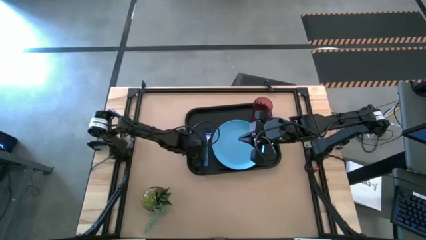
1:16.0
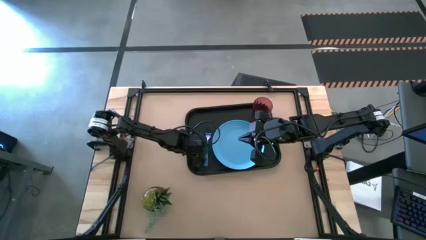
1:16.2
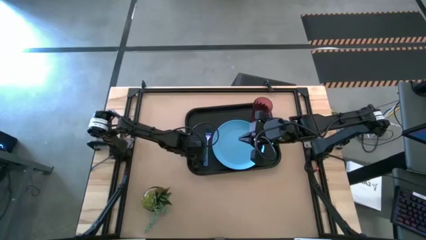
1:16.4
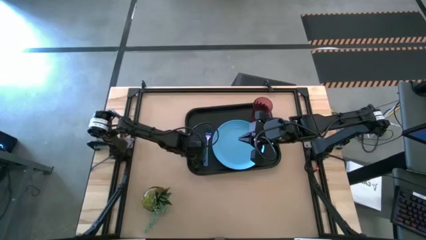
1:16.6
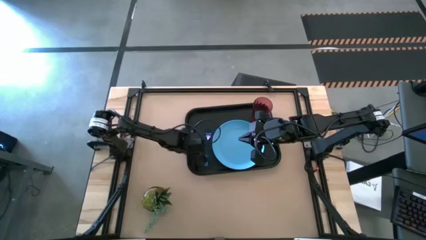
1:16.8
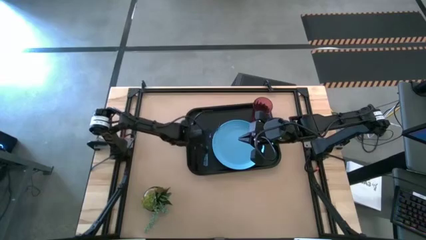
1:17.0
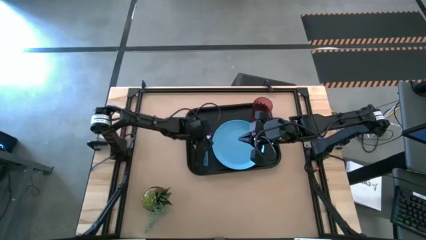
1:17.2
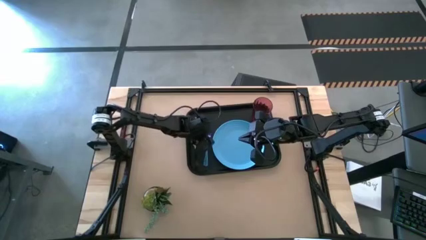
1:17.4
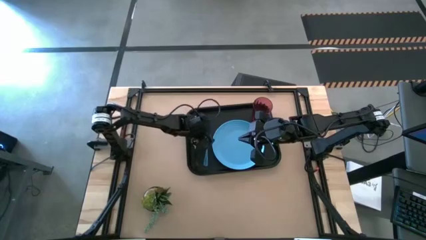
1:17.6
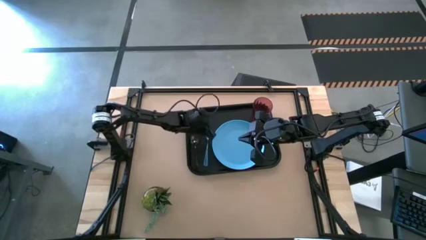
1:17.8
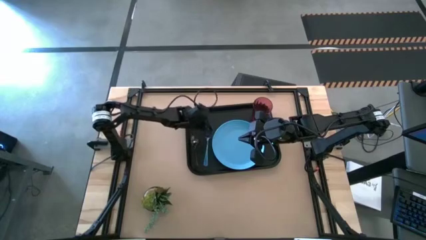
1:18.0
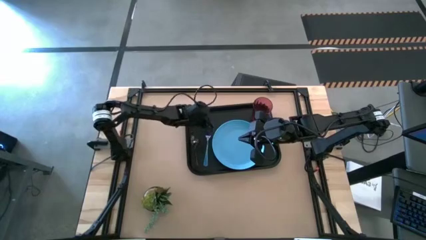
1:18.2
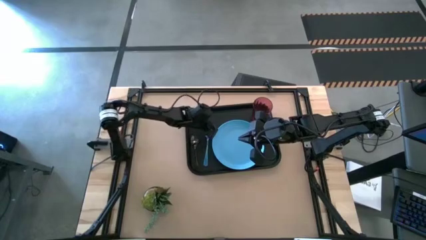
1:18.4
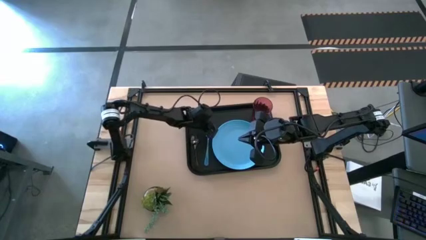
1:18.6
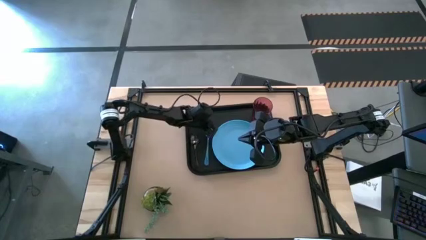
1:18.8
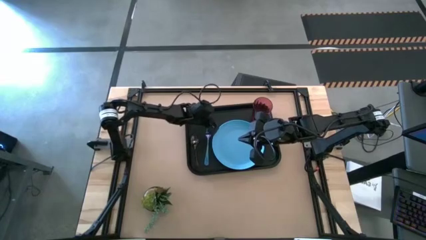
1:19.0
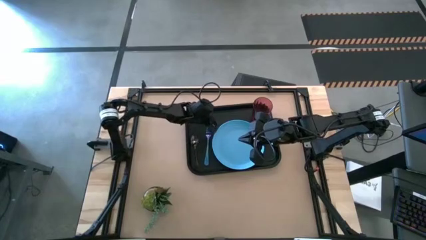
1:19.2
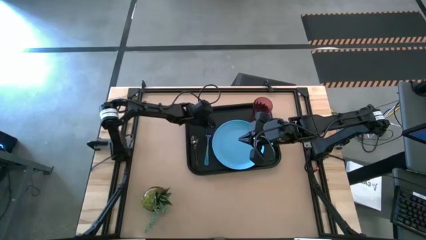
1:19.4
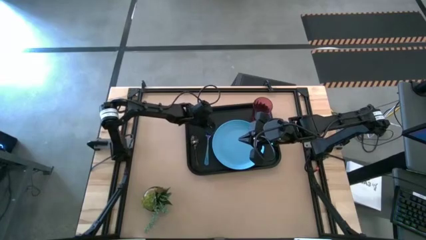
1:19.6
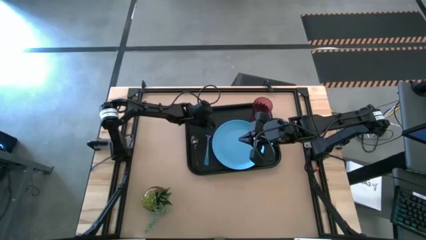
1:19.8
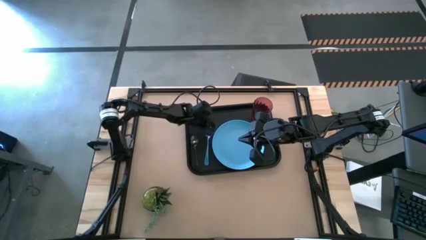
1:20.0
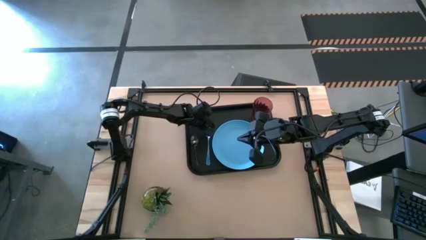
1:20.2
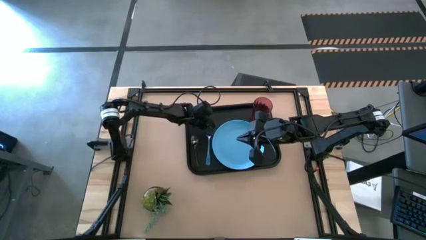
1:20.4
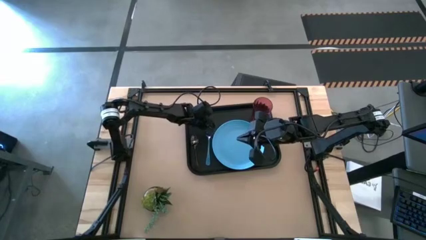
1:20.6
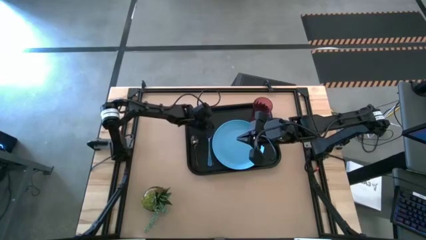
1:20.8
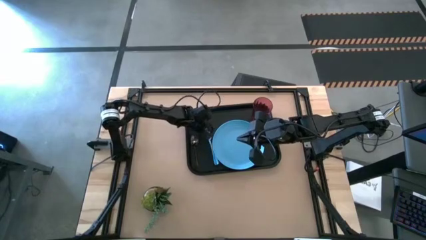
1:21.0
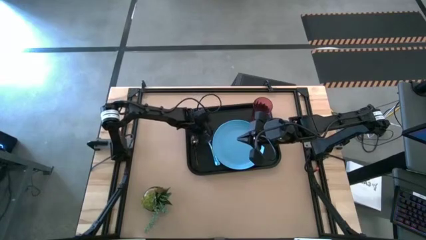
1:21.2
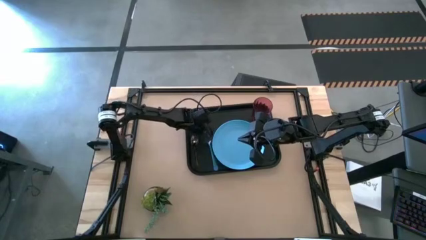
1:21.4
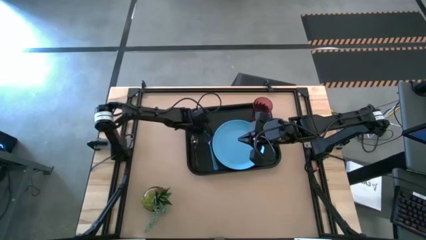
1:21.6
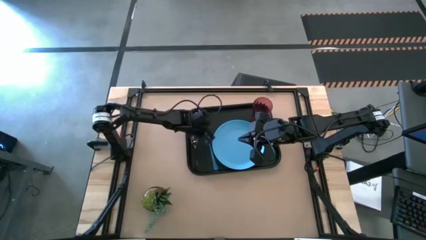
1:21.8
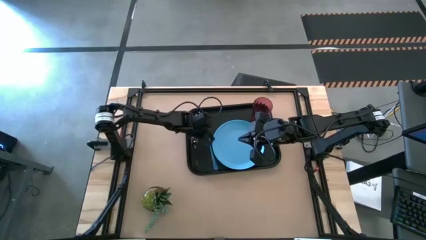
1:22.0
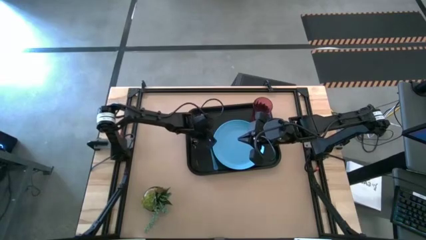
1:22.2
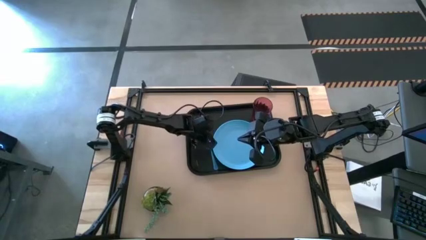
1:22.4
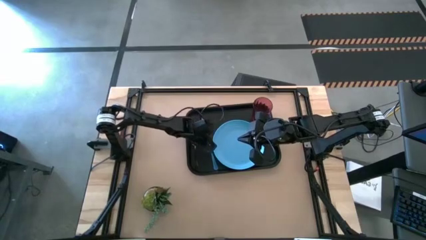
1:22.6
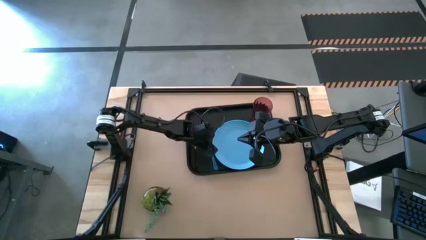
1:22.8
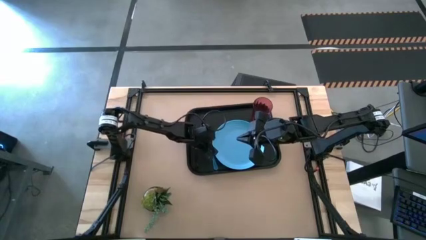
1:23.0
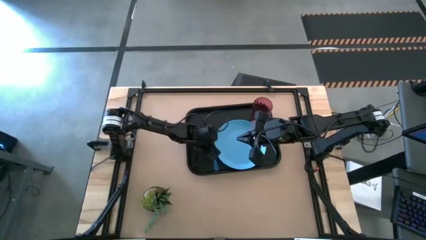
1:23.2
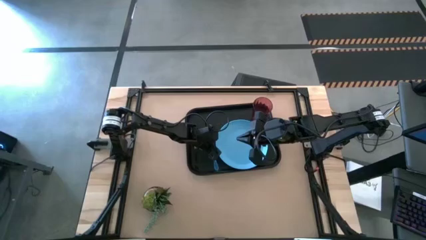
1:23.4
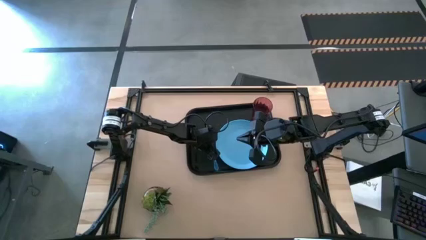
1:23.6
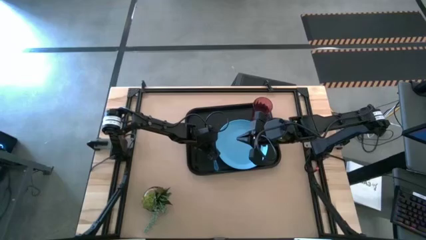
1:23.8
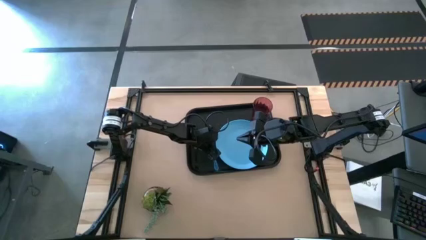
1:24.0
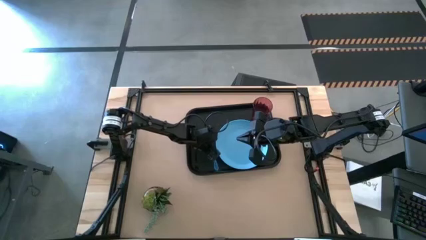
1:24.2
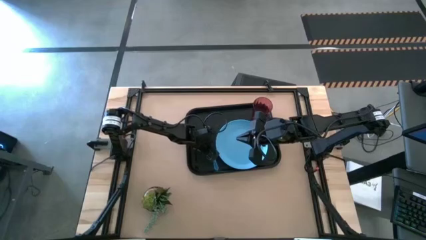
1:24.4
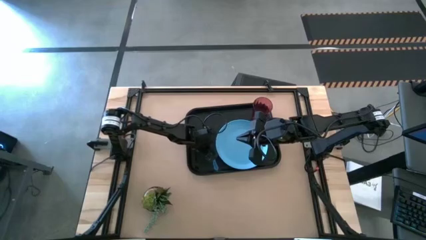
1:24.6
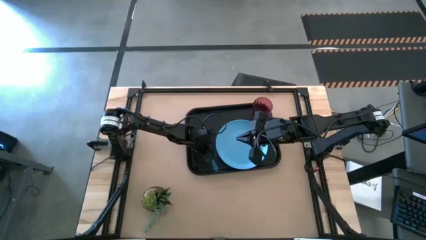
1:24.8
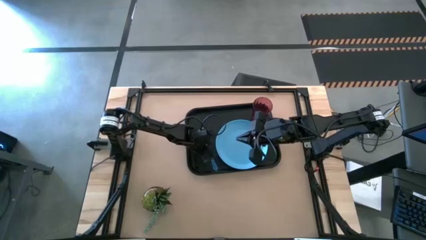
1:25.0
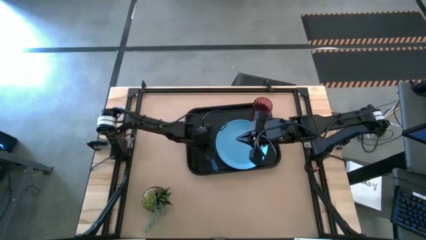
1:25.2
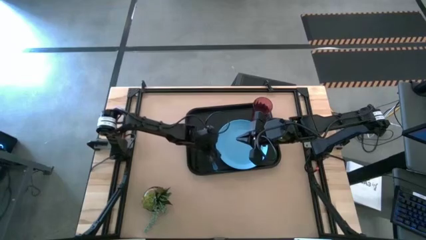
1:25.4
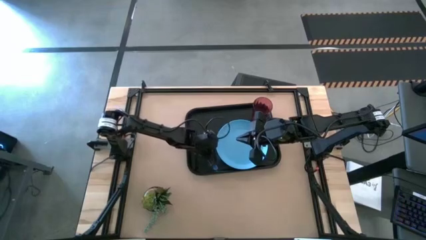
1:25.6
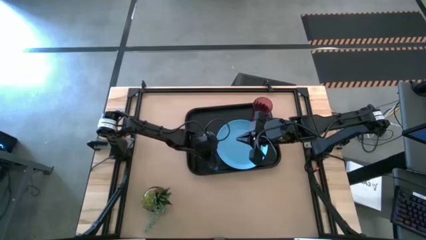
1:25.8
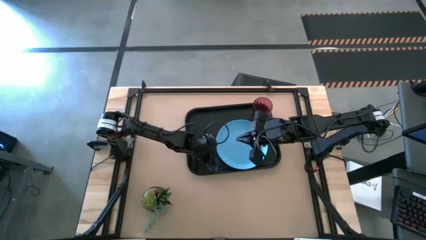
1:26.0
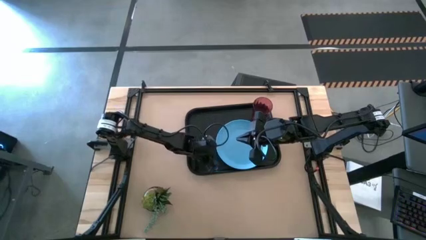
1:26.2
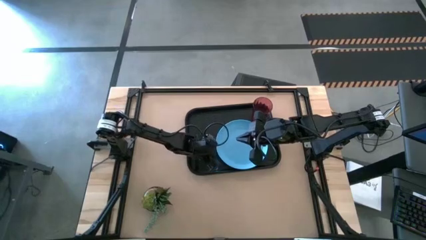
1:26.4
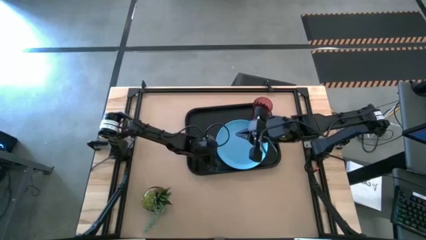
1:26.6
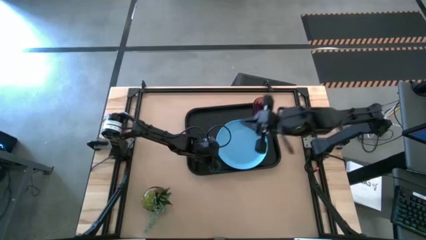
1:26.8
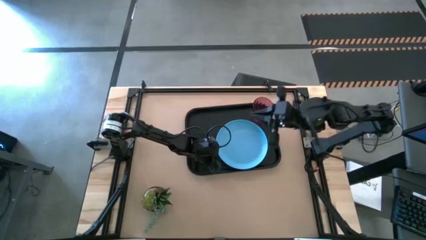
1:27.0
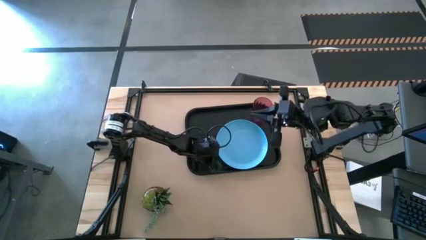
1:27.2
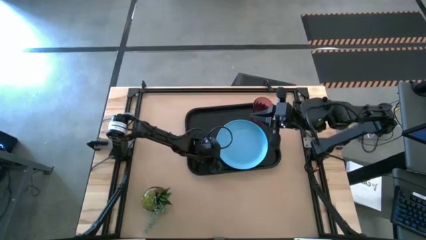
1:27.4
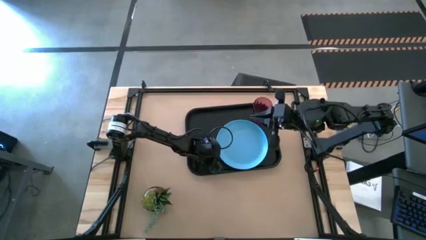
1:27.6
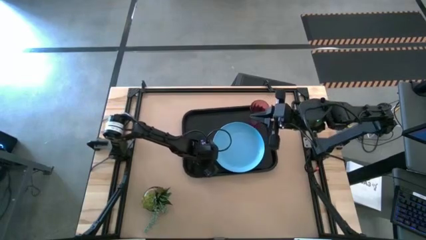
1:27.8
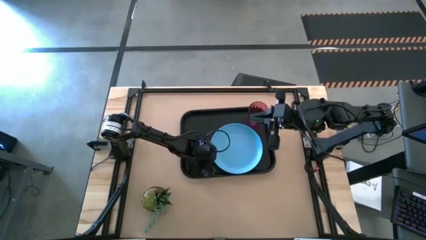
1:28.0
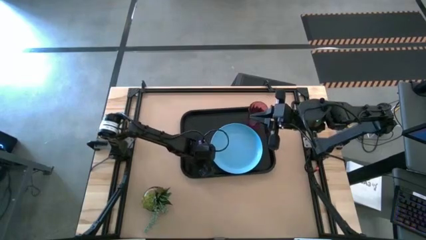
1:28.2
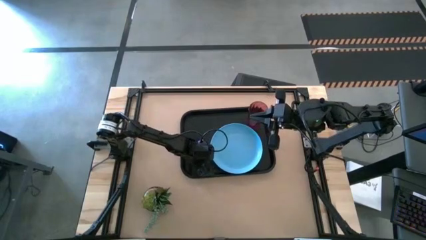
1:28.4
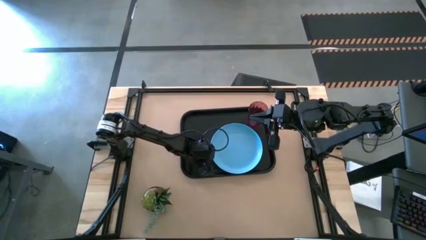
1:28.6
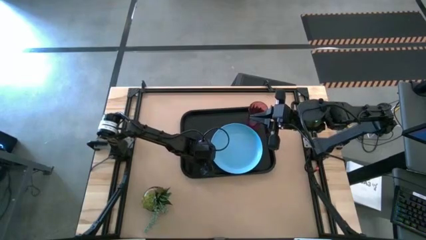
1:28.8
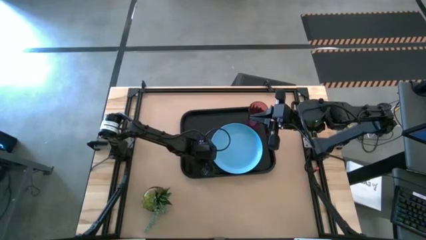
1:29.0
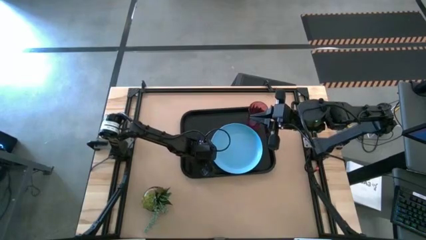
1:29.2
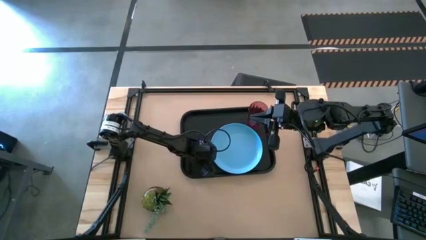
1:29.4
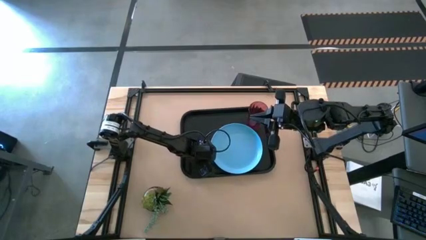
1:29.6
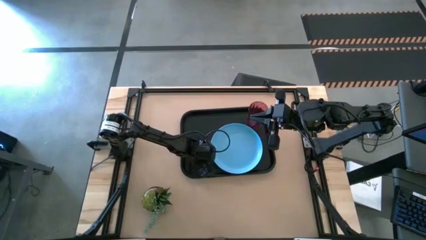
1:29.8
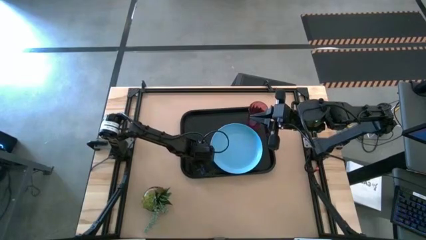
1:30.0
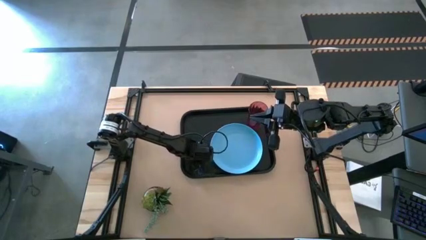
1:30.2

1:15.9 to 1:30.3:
Task: Pick and place plate/cup/fork/spoon on tray
Adjust the blue fork

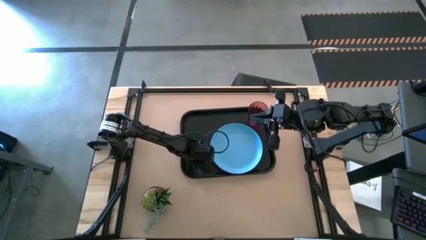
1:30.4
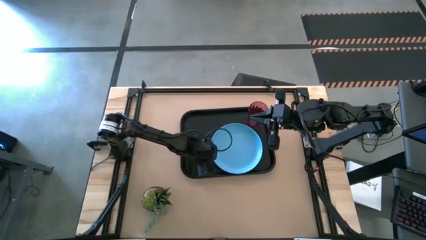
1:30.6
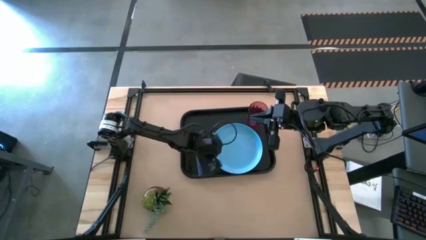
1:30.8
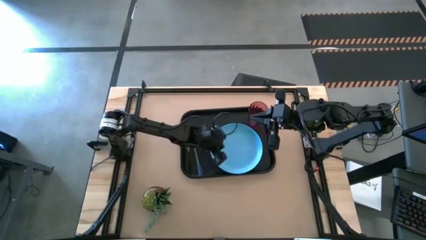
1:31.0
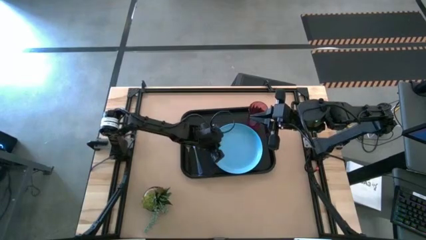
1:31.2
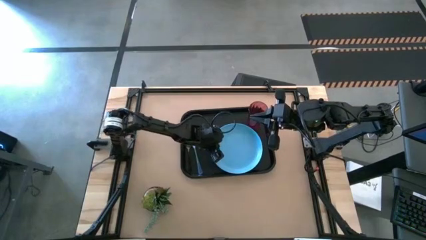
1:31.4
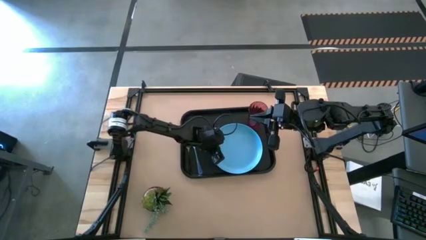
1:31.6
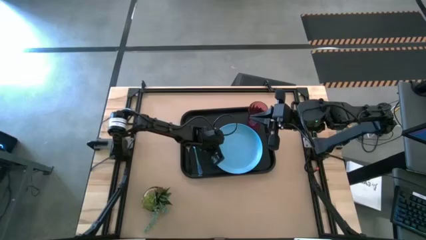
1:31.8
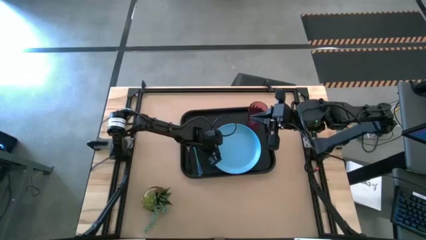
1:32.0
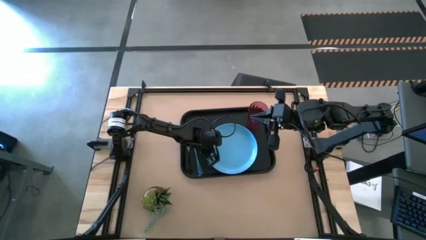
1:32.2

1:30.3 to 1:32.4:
Adjust the blue plate
